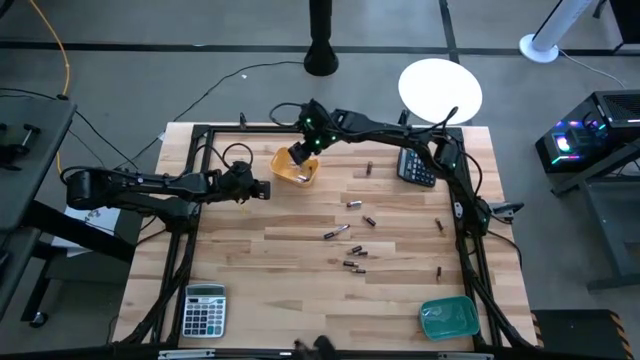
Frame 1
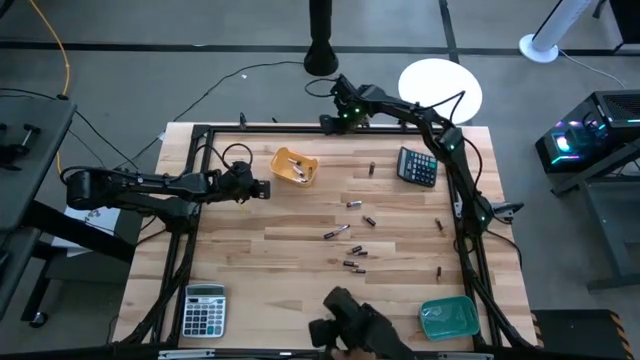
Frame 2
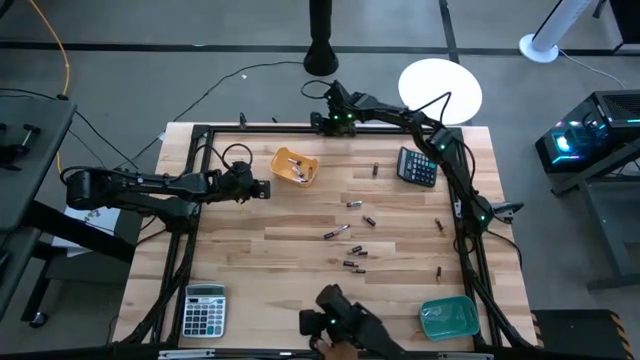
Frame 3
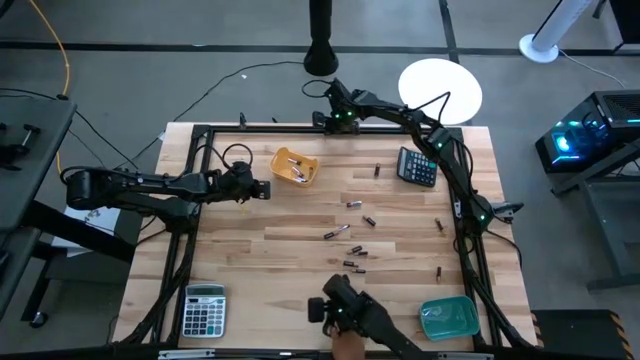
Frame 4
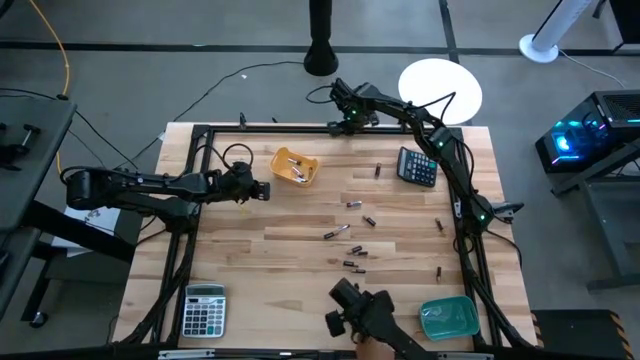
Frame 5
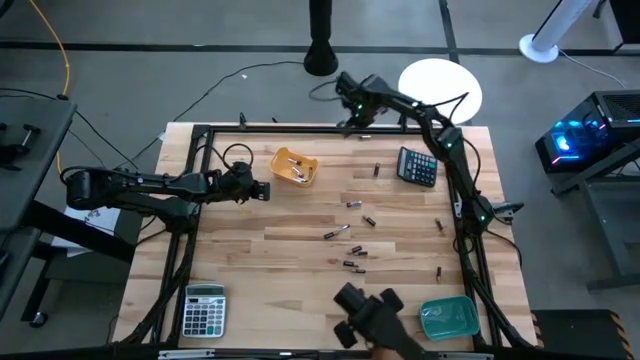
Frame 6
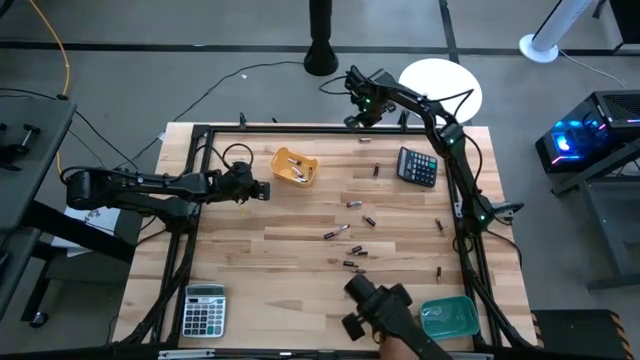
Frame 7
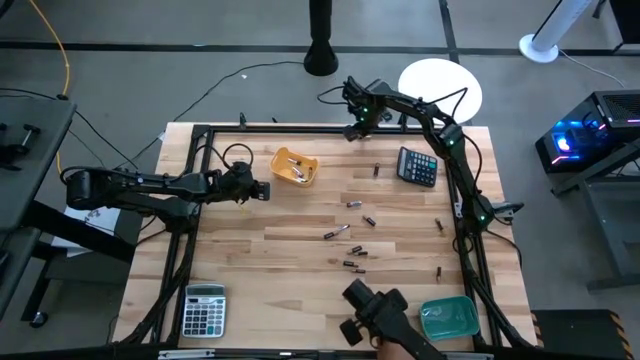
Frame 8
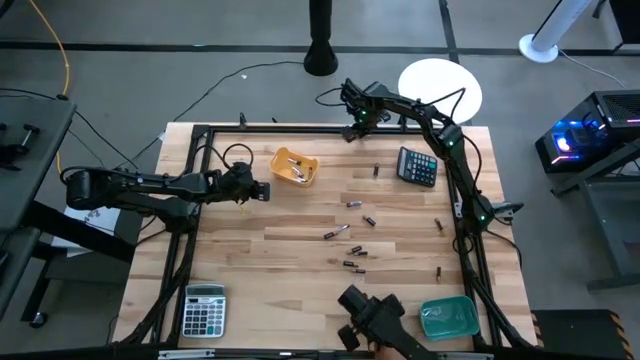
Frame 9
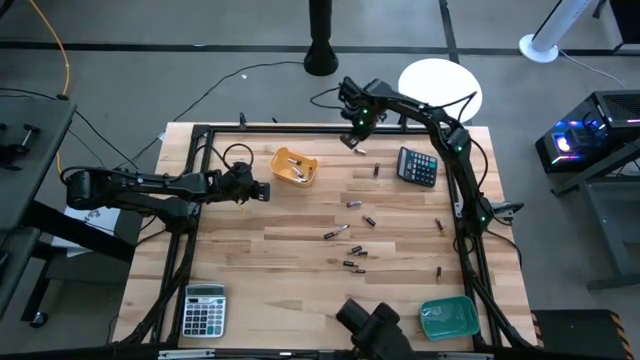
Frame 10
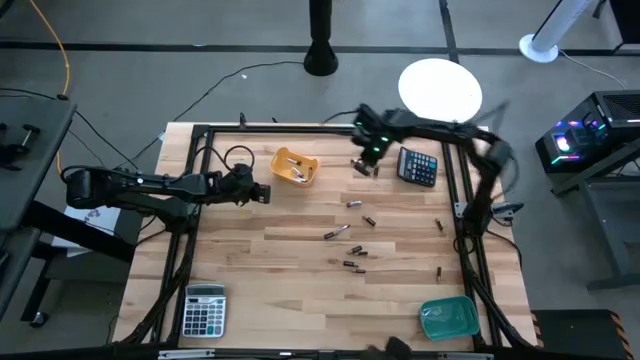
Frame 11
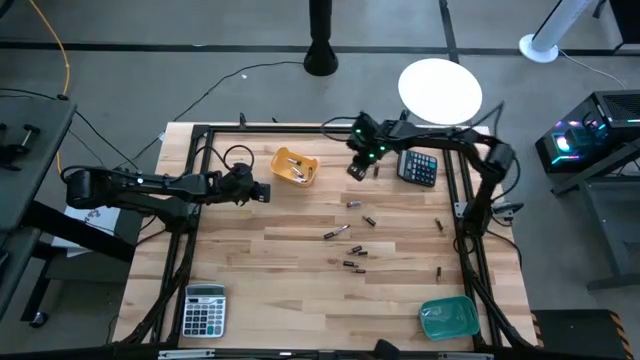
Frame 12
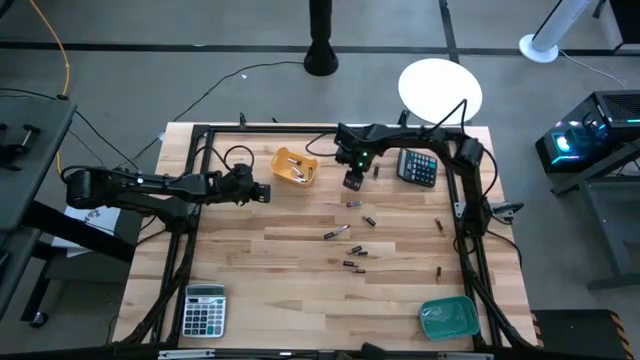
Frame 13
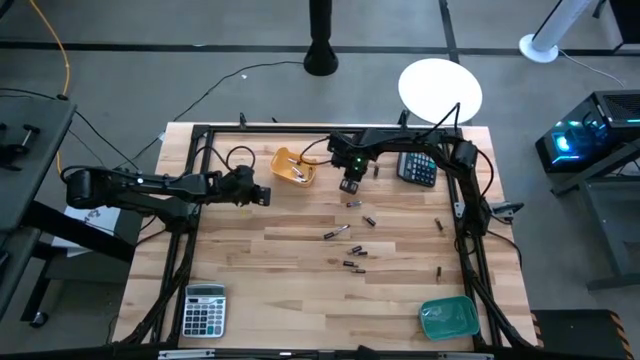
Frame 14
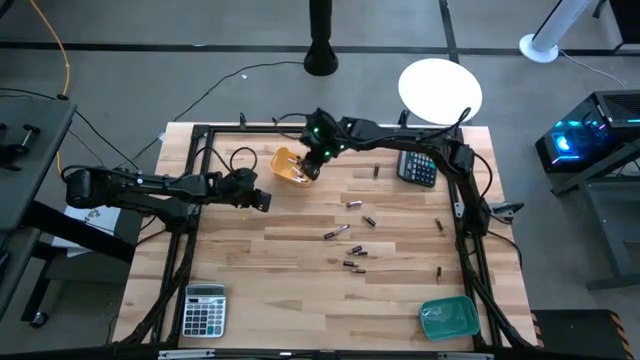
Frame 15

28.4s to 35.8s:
Task: Sort batteries
Put the silver battery into the yellow bin

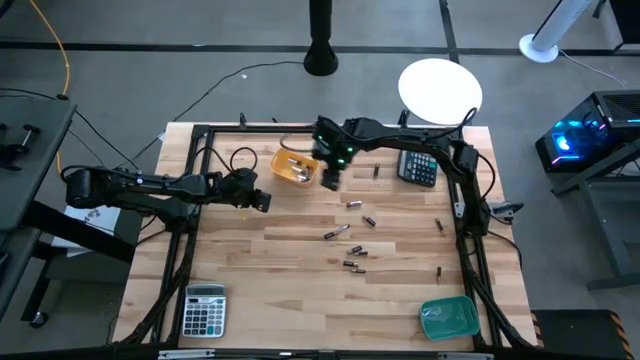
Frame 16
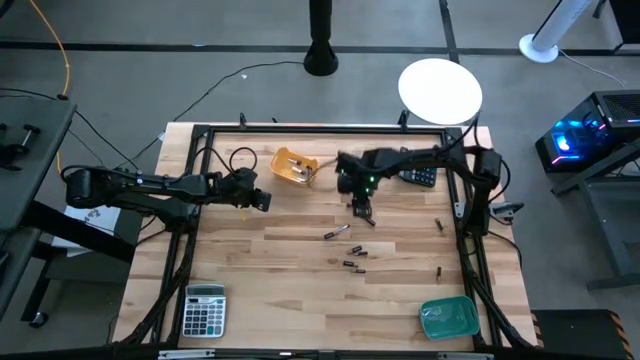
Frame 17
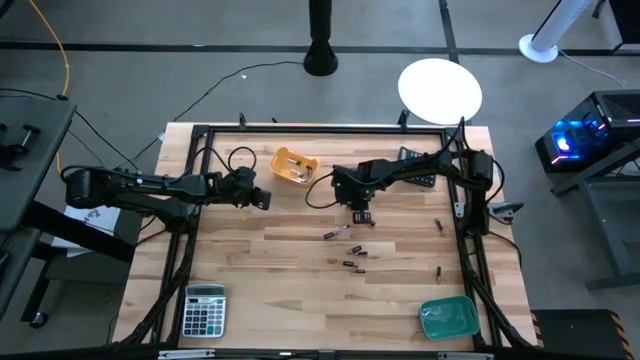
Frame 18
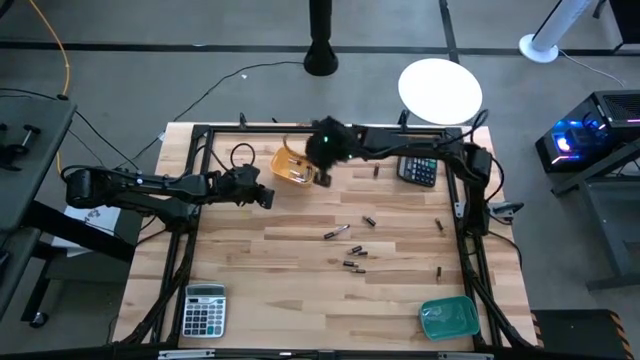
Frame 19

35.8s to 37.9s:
Put the silver battery into the yellow bin

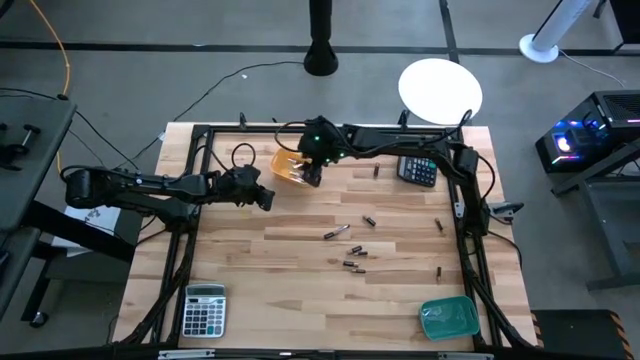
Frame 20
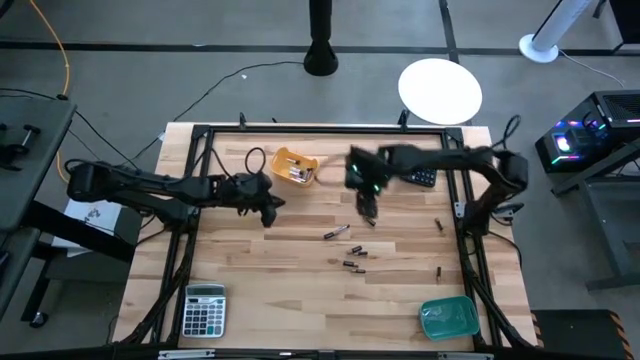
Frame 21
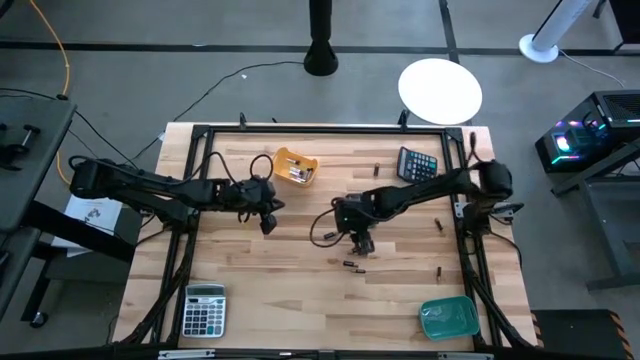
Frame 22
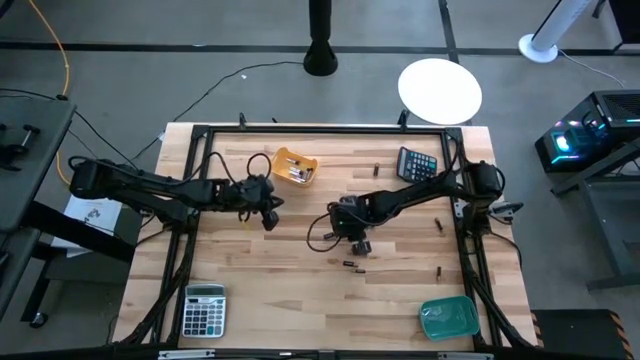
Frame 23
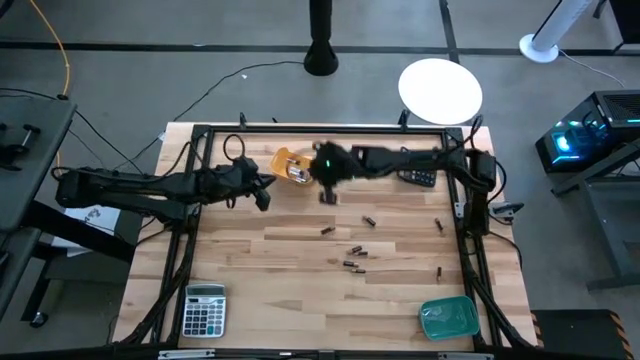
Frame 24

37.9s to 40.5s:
Put the silver battery into the yellow bin

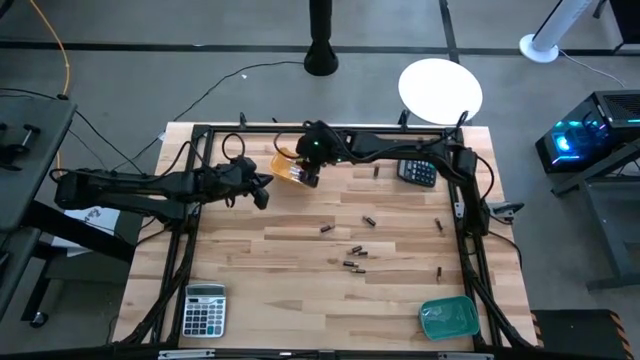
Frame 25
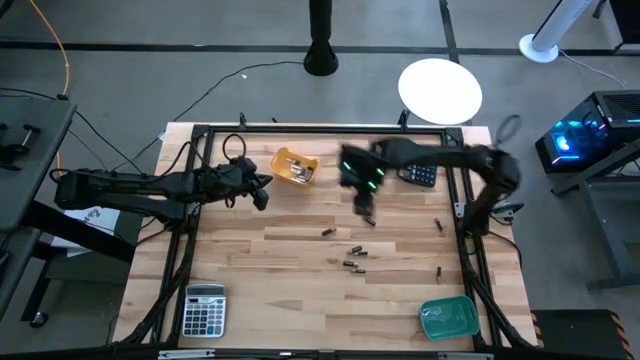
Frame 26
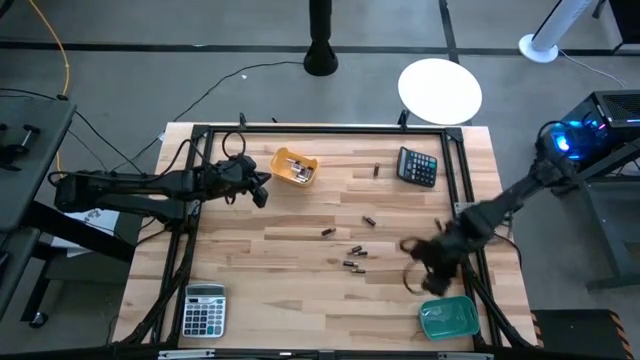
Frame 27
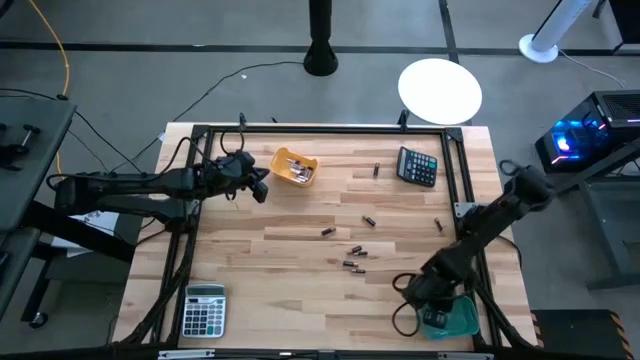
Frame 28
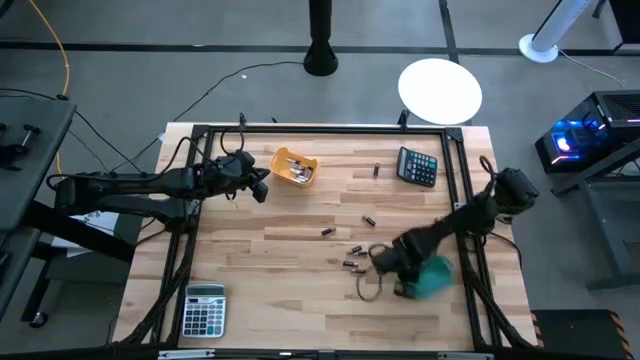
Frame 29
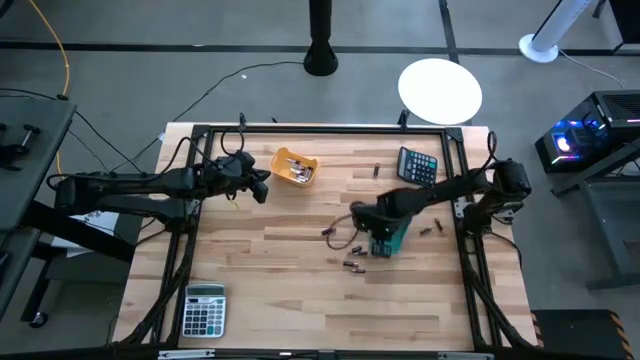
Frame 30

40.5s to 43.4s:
Move the blue bin to the middle right of the table

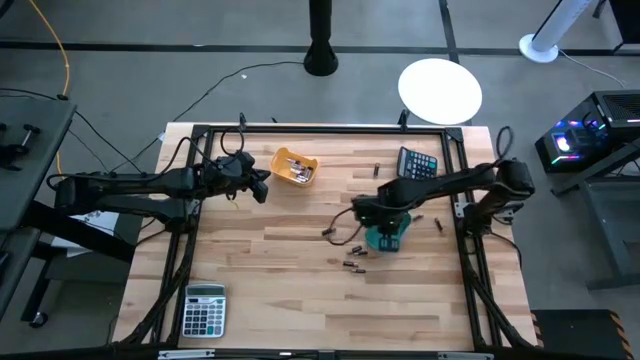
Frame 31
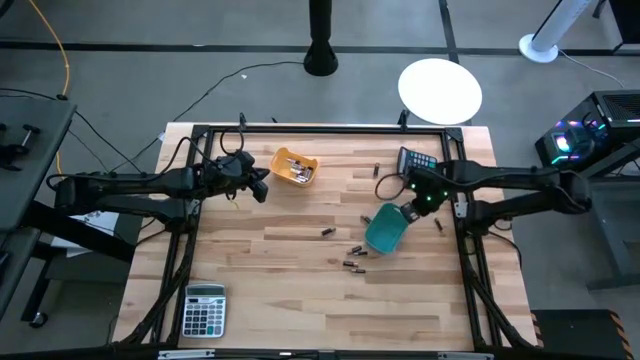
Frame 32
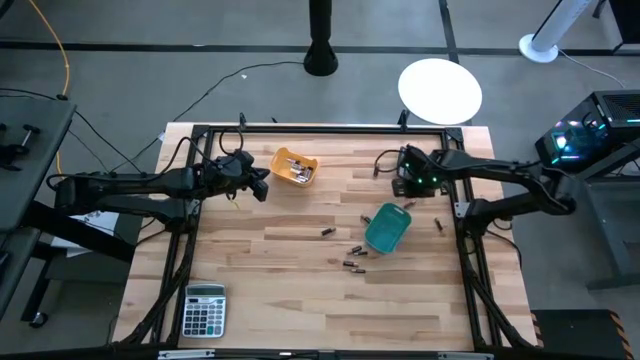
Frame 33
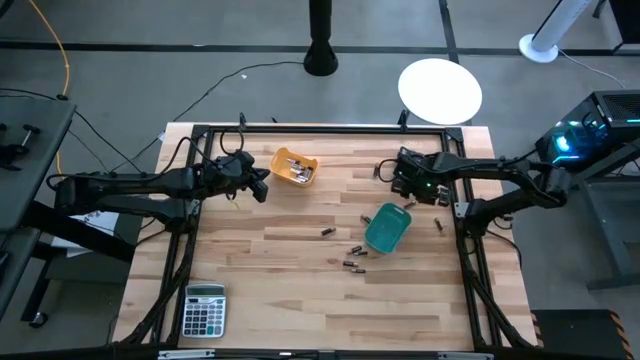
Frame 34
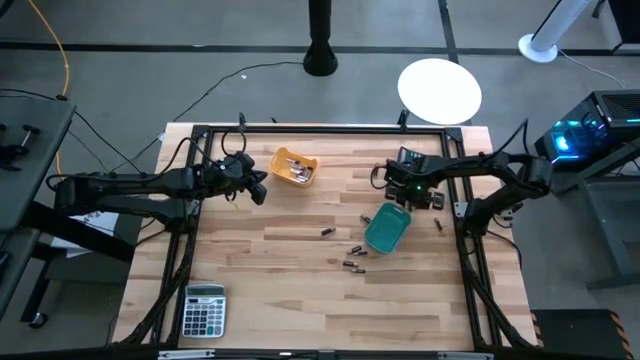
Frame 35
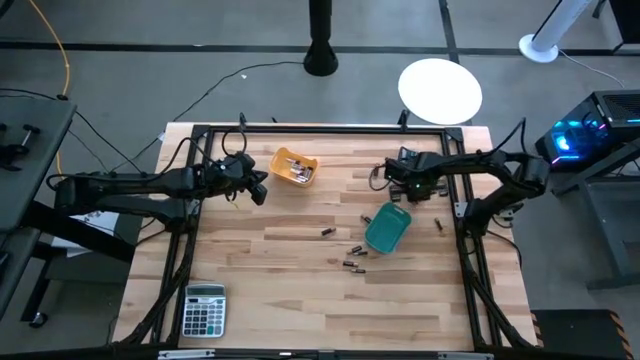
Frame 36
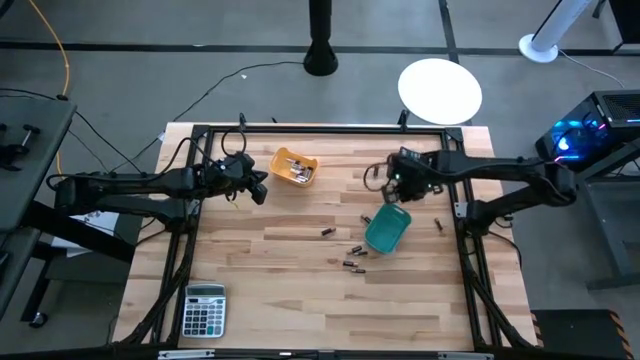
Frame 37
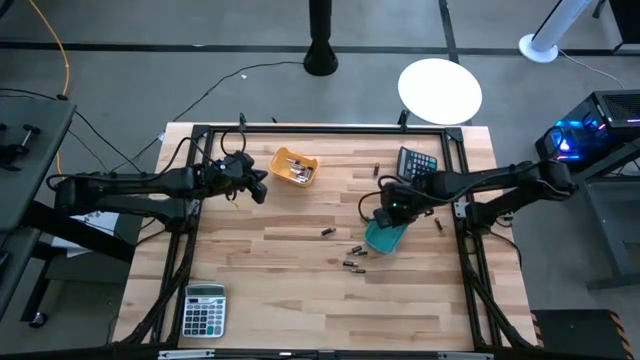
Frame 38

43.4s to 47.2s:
Put the black battery into the blue bin

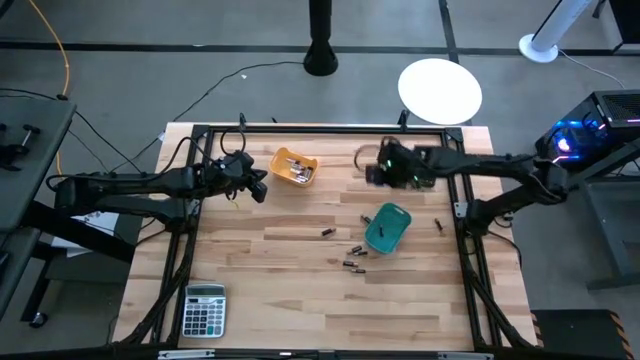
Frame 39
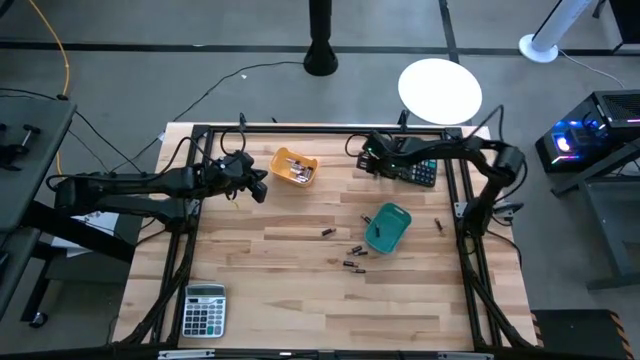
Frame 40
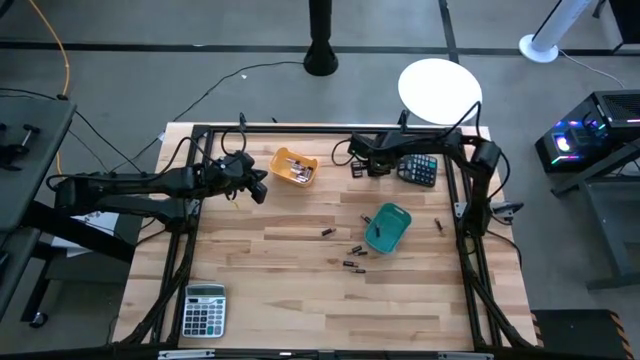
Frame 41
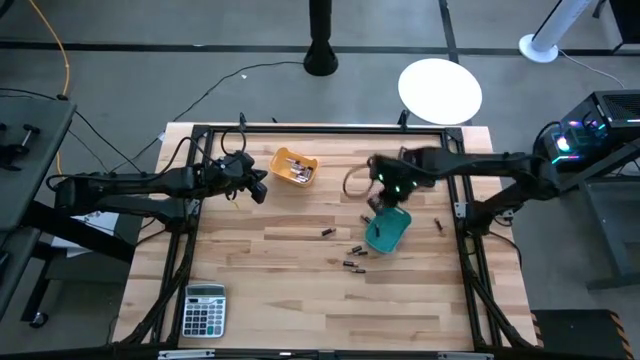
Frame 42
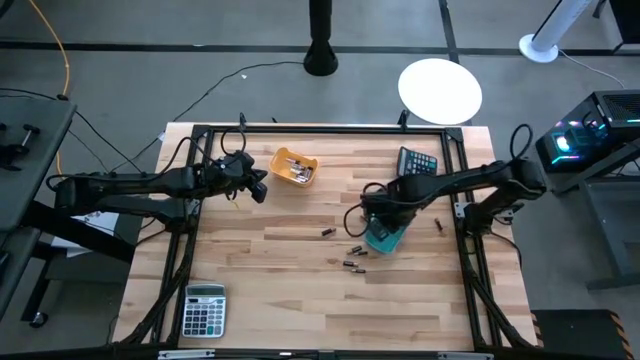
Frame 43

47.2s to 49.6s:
Put the black battery into the blue bin
